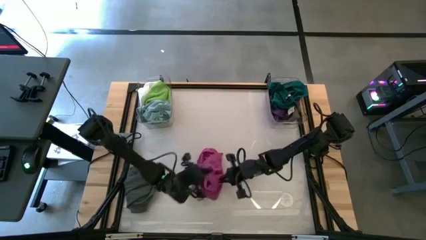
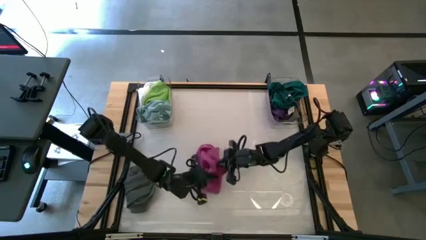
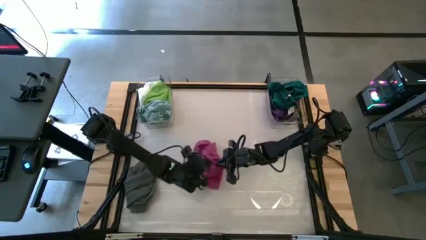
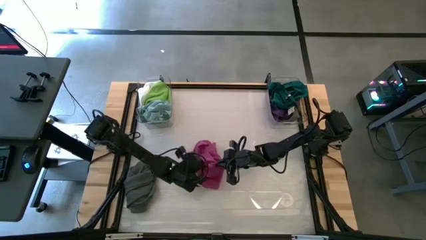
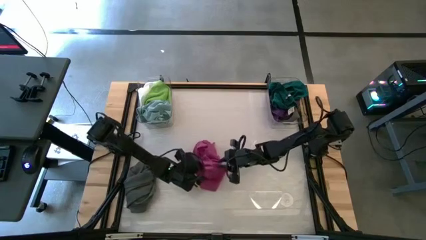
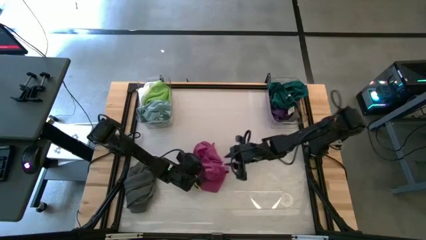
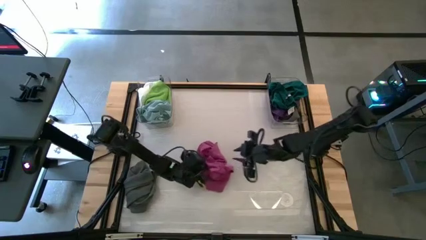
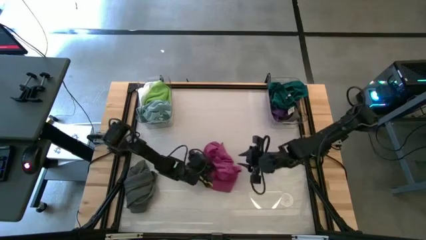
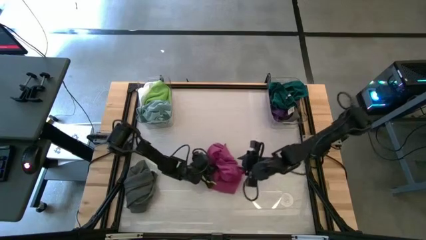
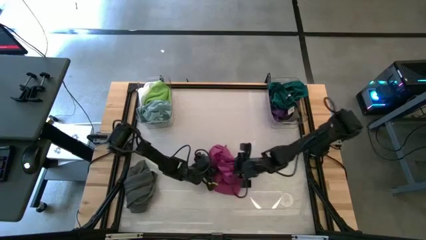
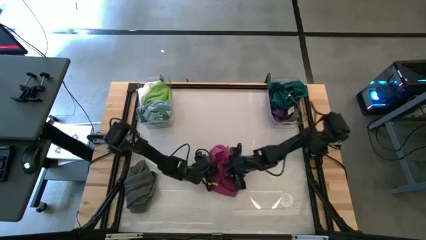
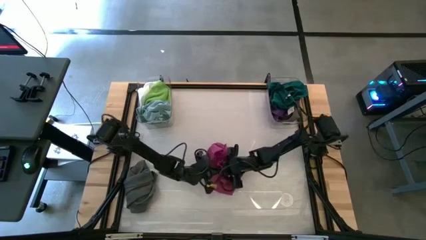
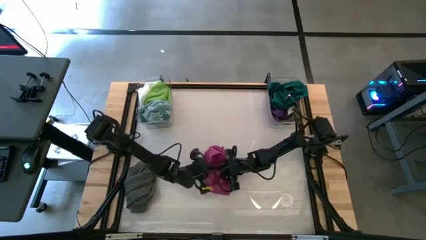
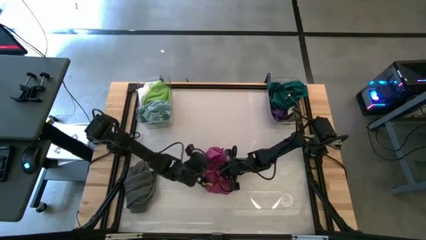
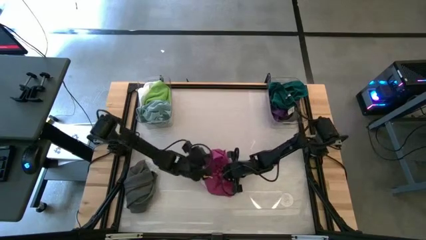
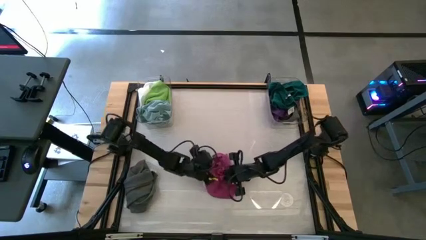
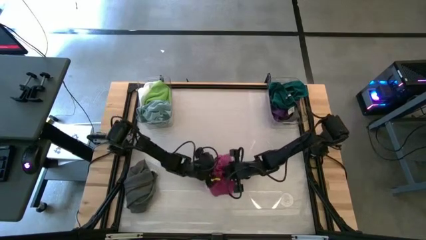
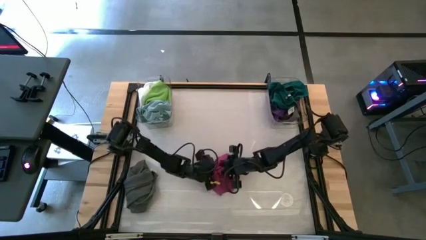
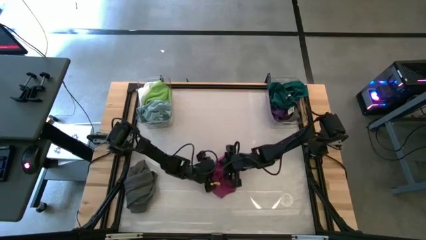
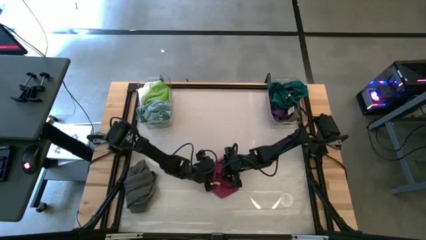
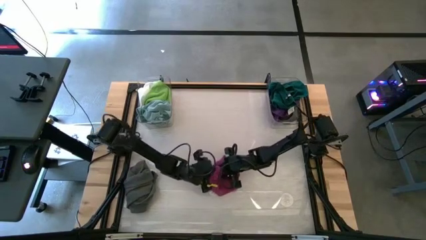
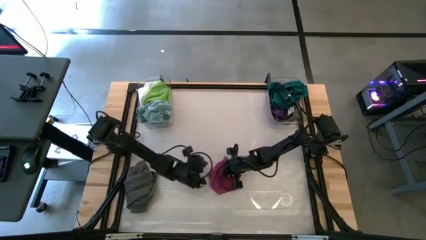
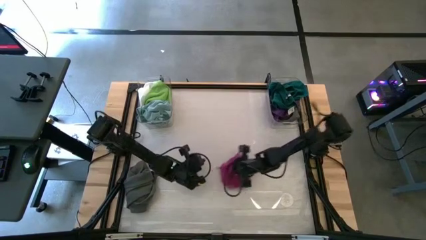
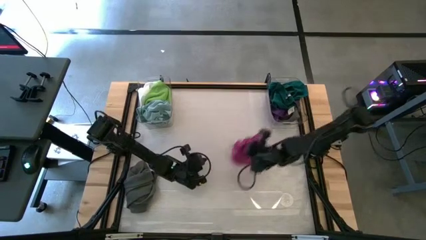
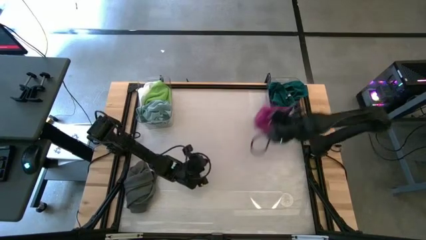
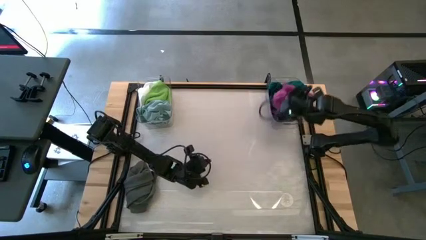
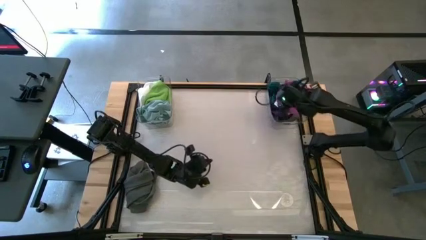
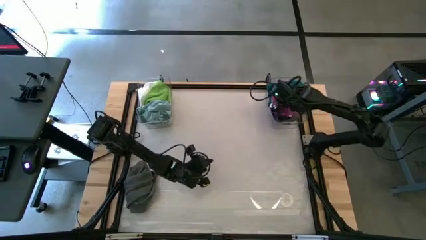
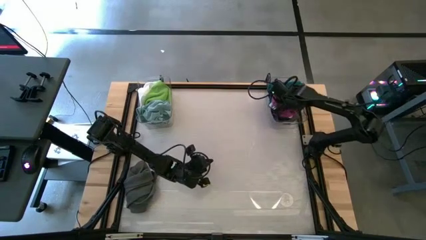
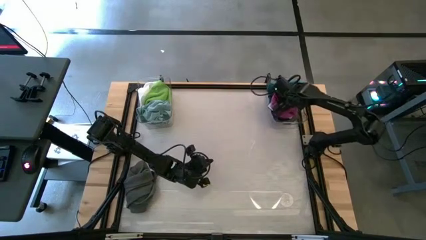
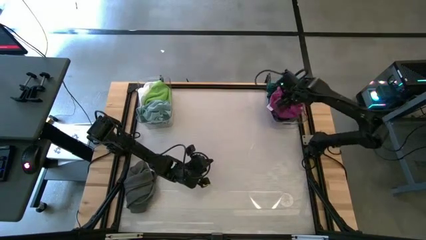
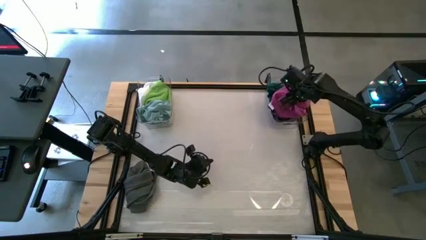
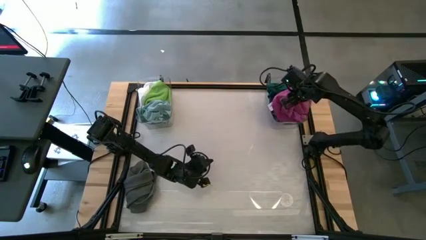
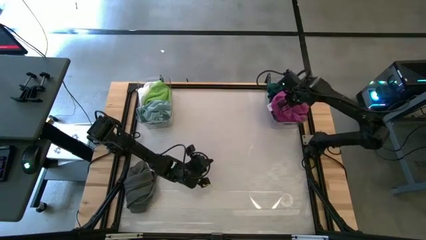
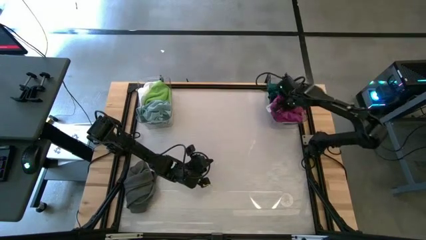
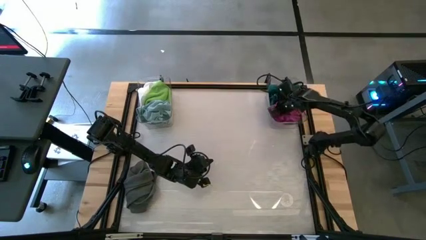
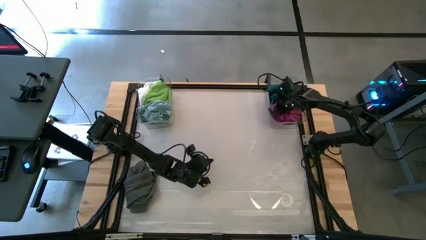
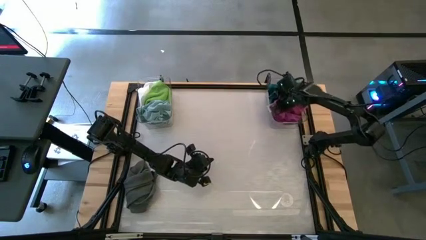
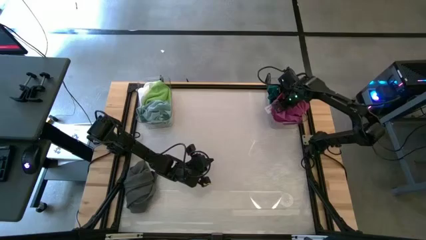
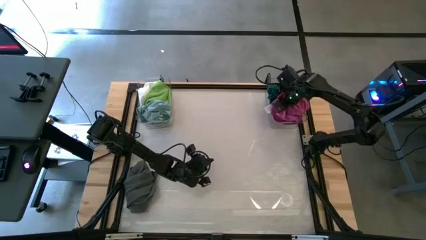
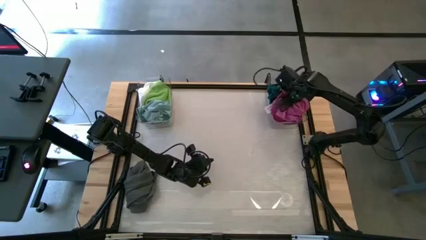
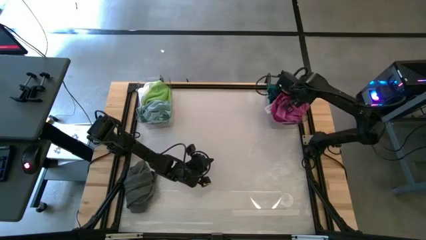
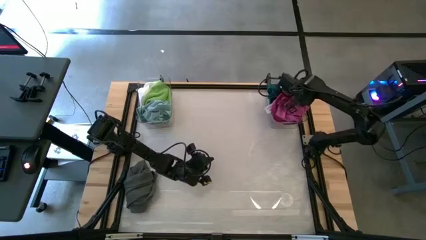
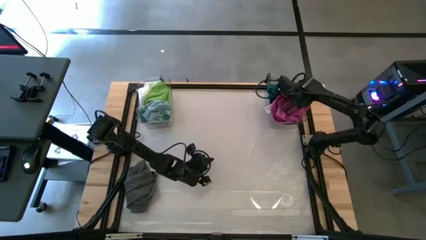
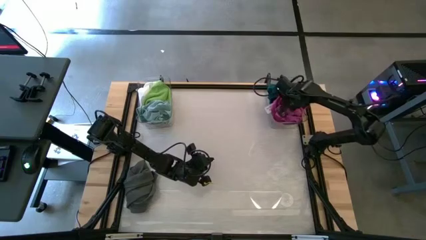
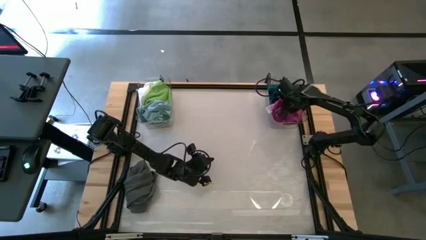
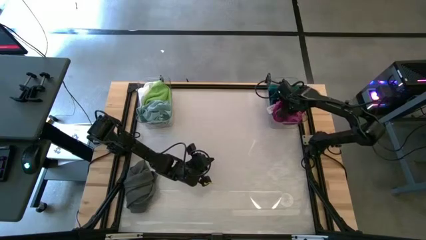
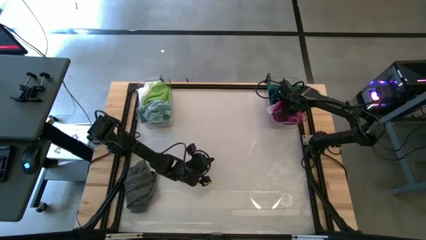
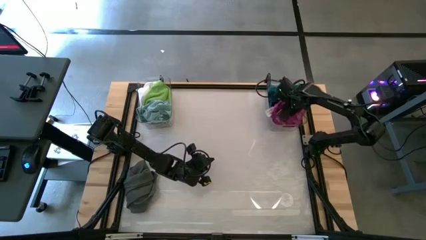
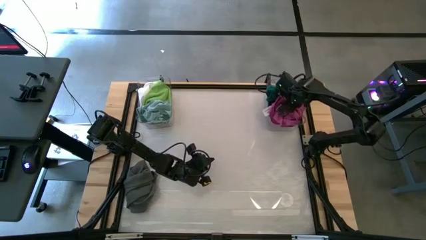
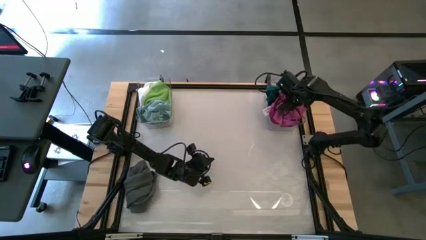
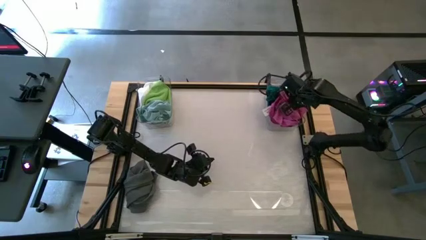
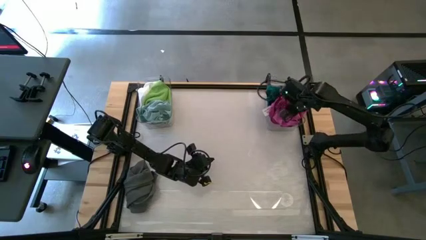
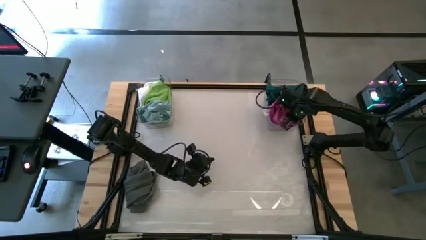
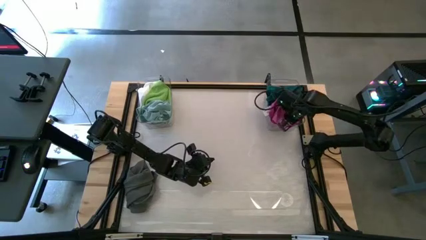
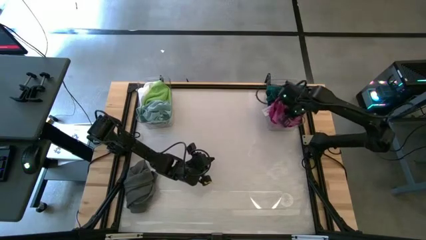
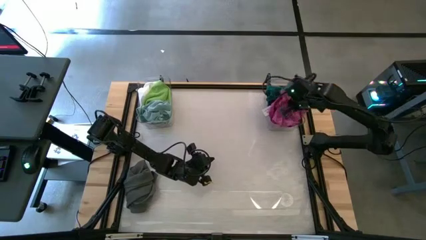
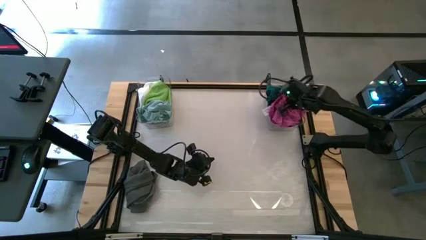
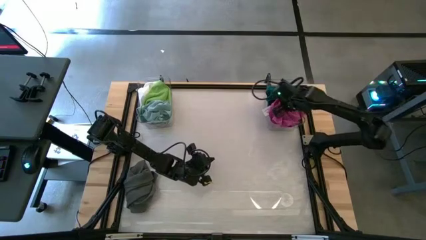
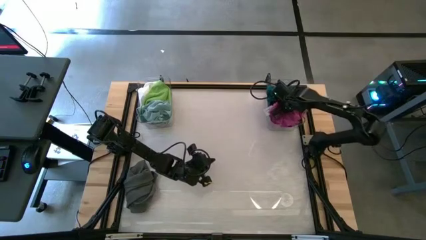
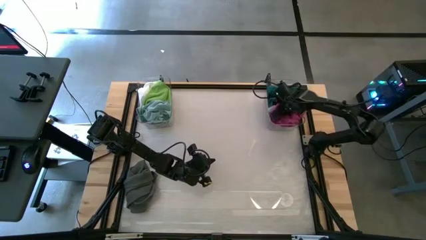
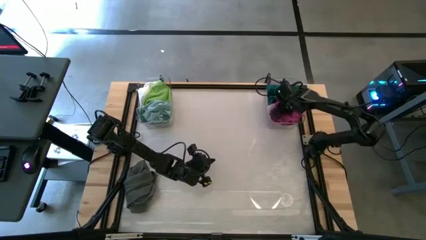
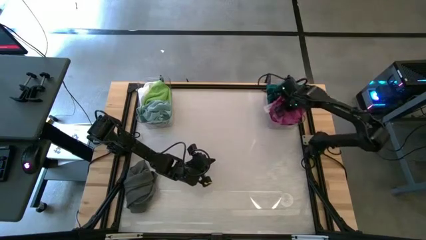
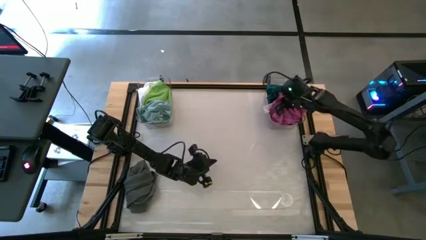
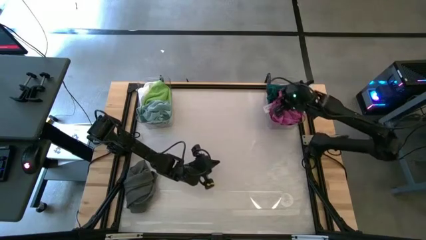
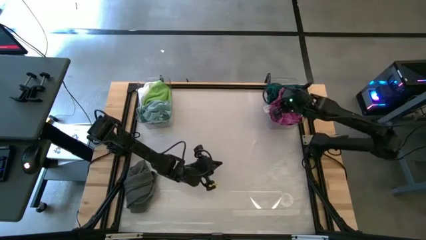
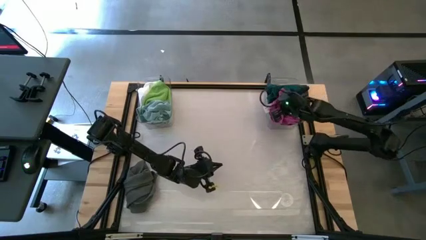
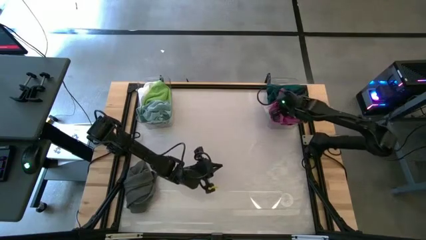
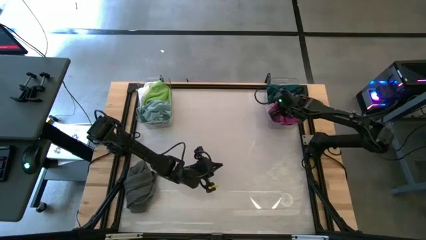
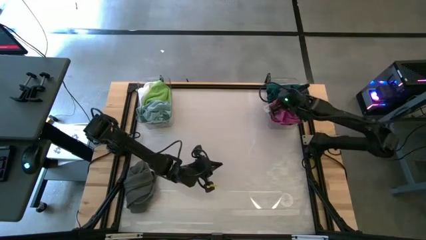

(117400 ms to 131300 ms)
Task: Sort towels by color in basket
Put the pink towel into the right transparent bin
